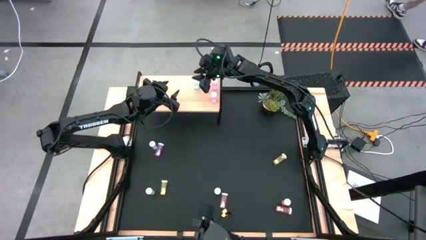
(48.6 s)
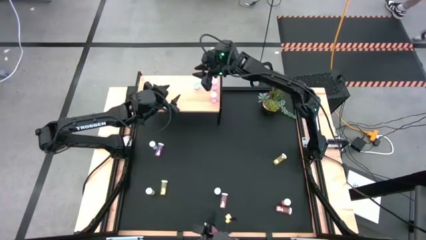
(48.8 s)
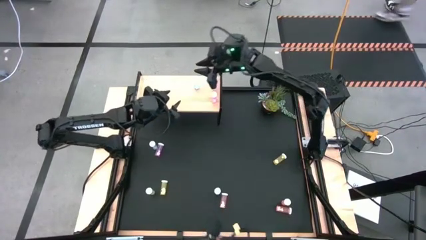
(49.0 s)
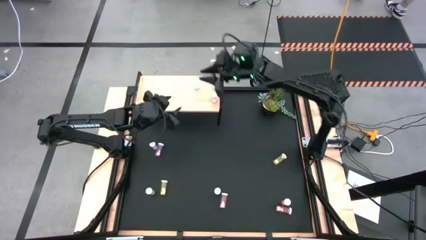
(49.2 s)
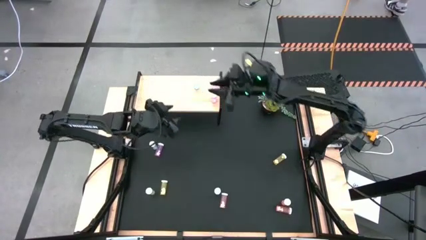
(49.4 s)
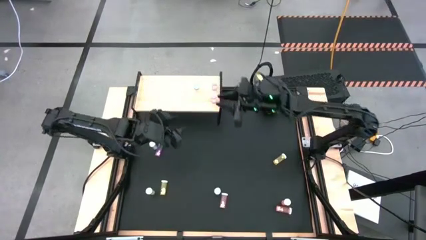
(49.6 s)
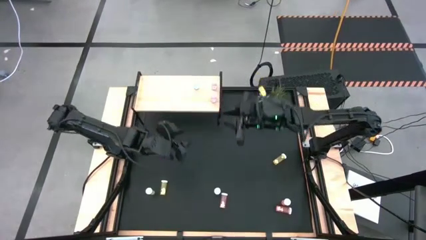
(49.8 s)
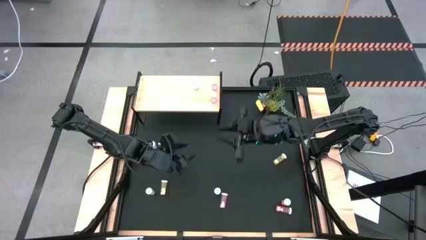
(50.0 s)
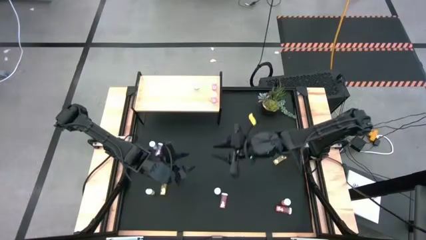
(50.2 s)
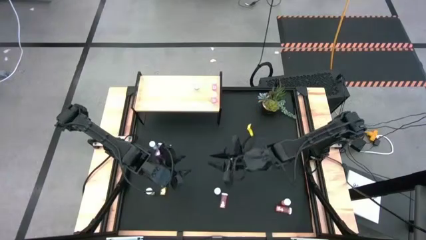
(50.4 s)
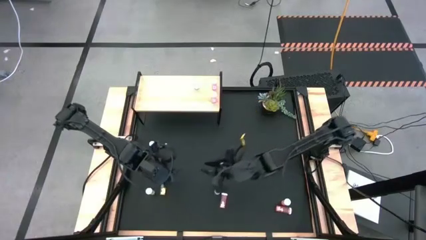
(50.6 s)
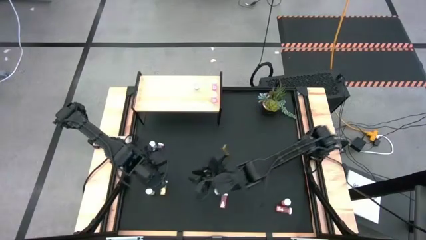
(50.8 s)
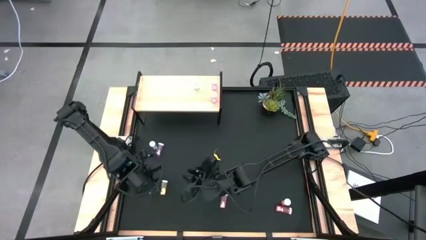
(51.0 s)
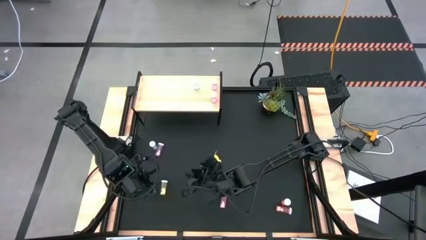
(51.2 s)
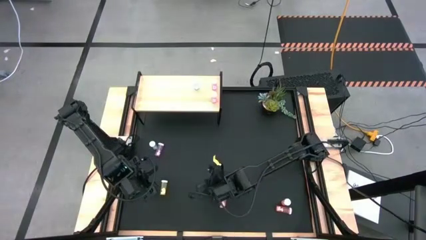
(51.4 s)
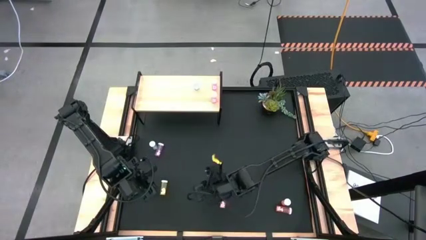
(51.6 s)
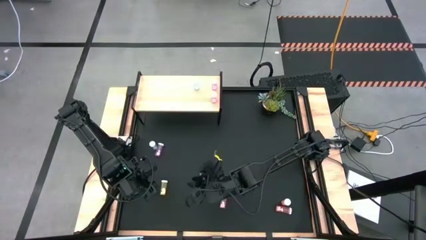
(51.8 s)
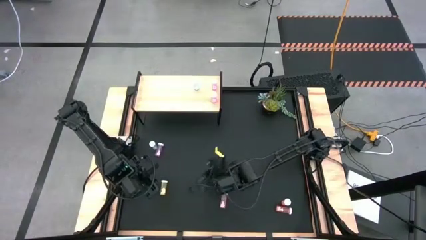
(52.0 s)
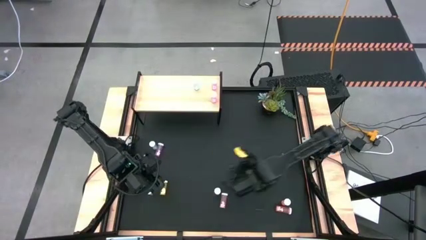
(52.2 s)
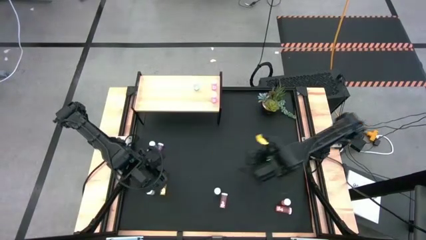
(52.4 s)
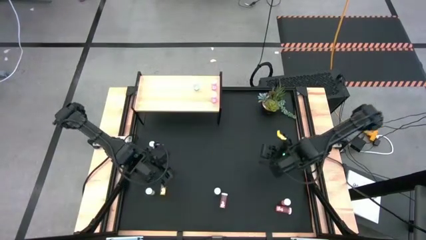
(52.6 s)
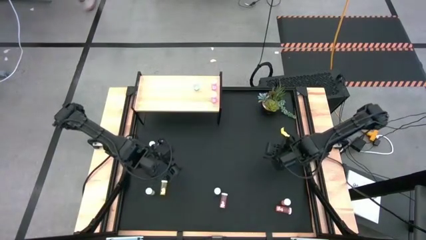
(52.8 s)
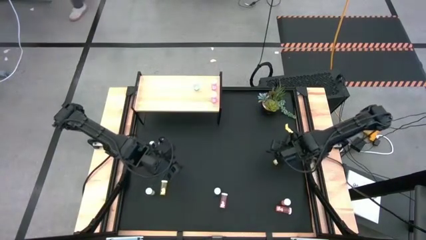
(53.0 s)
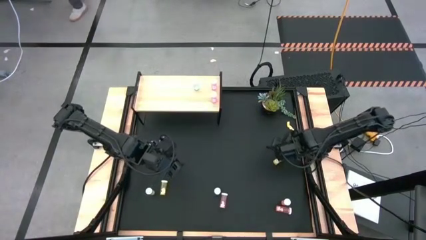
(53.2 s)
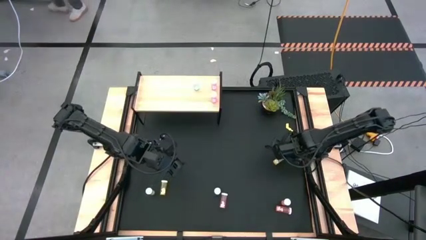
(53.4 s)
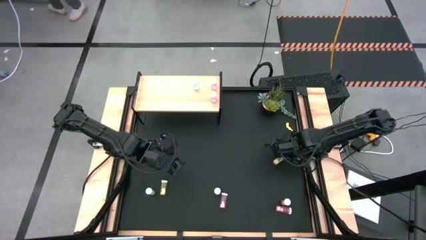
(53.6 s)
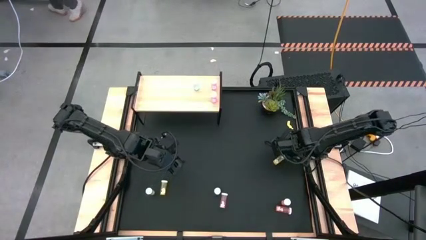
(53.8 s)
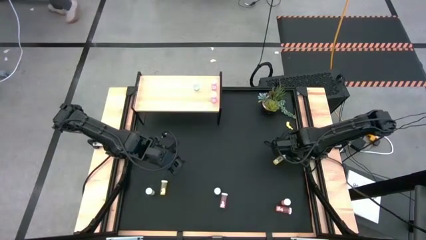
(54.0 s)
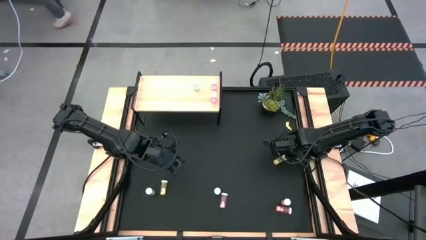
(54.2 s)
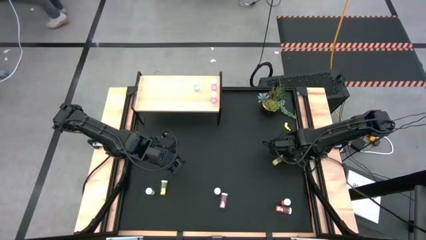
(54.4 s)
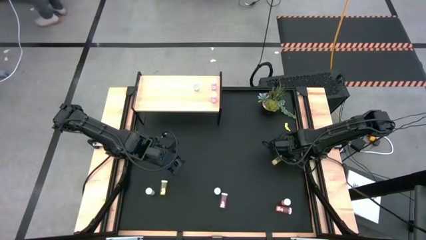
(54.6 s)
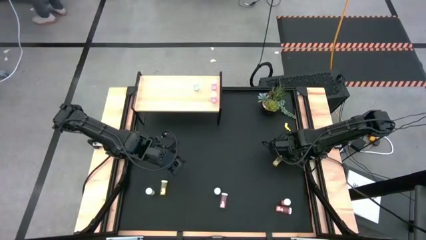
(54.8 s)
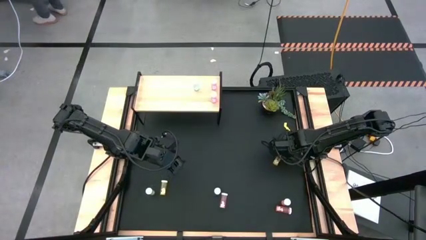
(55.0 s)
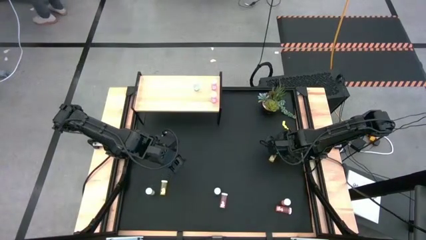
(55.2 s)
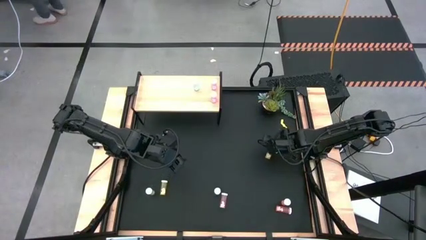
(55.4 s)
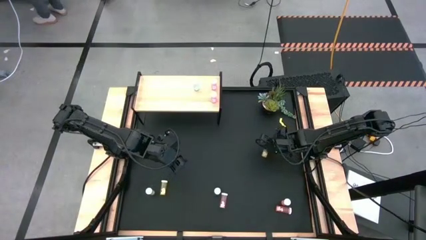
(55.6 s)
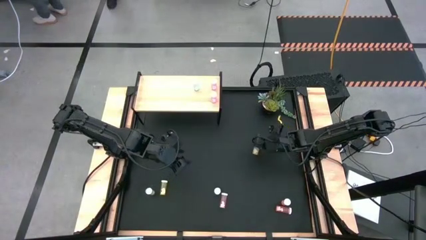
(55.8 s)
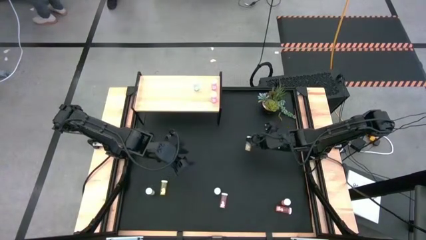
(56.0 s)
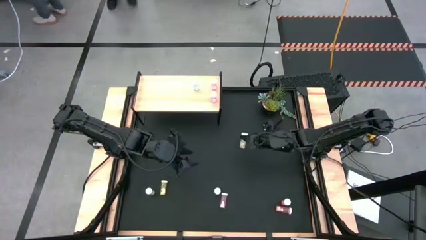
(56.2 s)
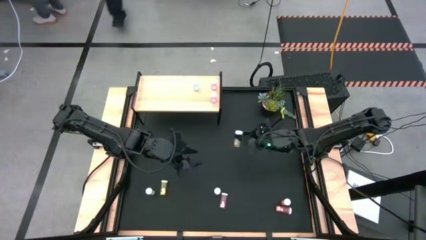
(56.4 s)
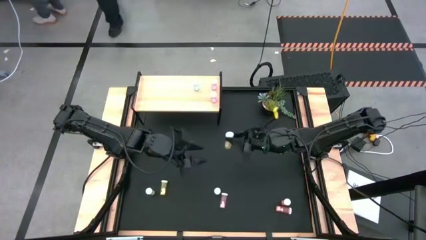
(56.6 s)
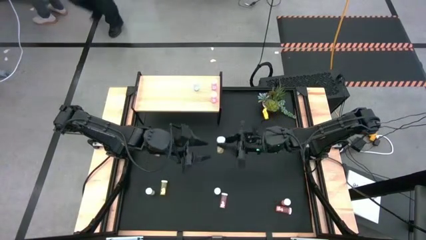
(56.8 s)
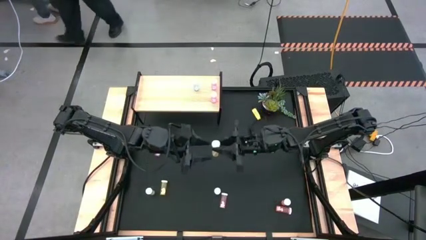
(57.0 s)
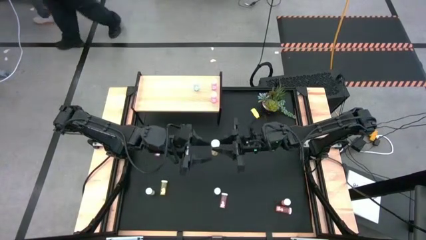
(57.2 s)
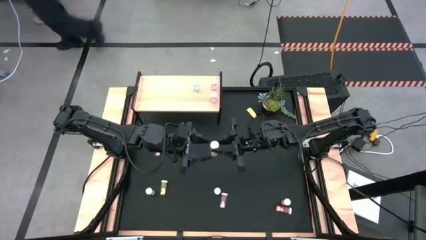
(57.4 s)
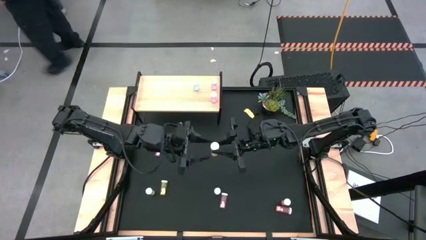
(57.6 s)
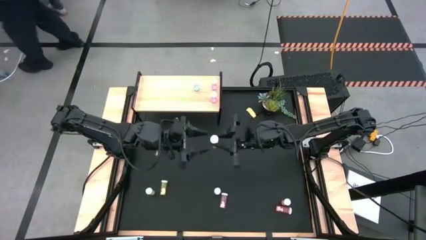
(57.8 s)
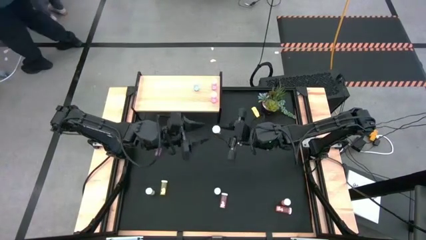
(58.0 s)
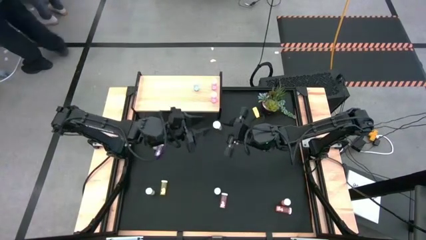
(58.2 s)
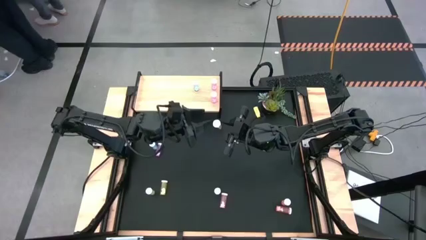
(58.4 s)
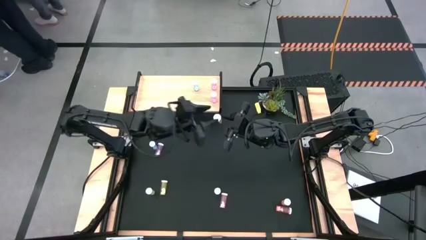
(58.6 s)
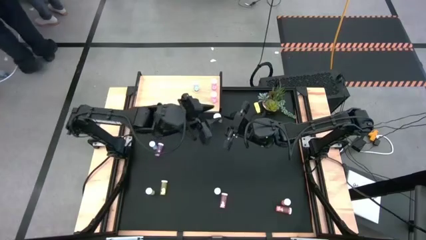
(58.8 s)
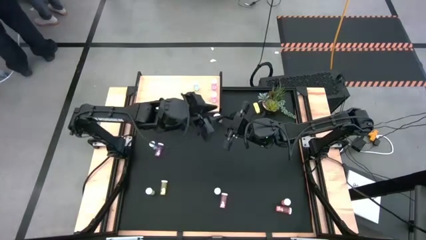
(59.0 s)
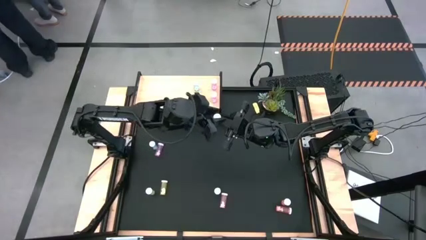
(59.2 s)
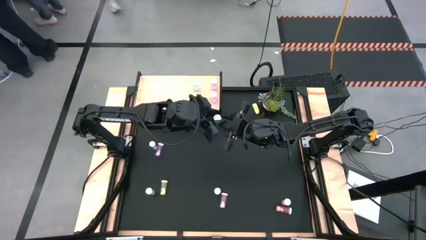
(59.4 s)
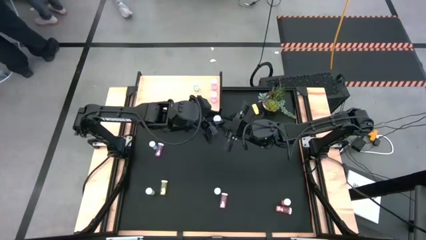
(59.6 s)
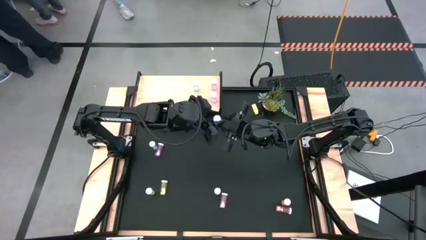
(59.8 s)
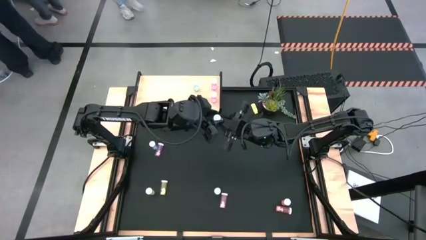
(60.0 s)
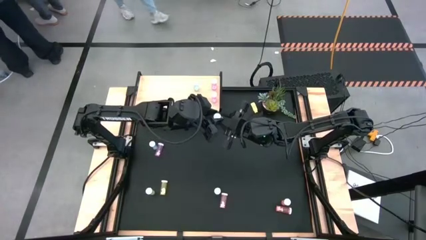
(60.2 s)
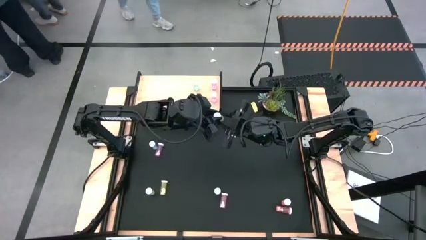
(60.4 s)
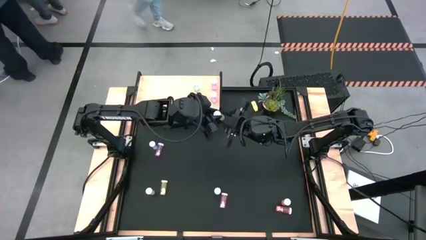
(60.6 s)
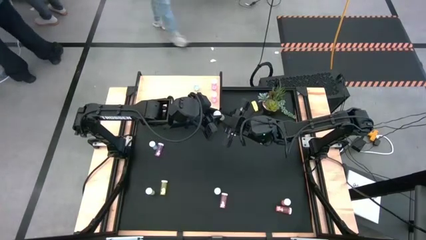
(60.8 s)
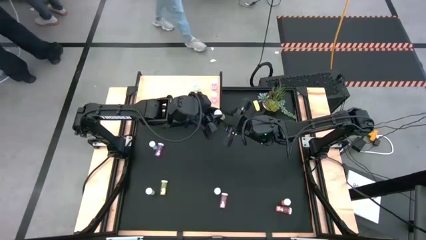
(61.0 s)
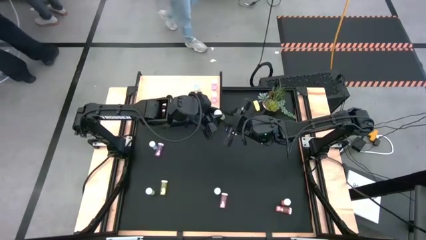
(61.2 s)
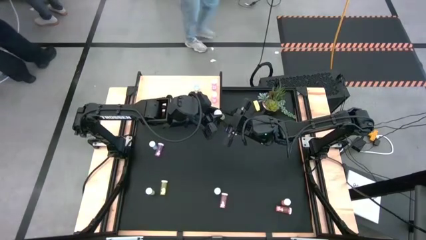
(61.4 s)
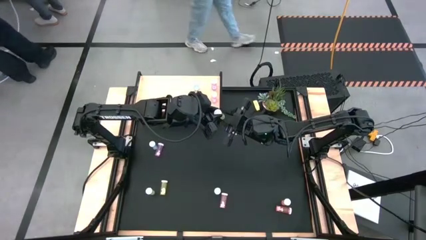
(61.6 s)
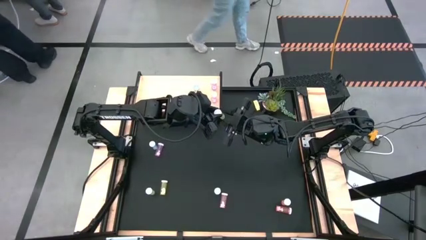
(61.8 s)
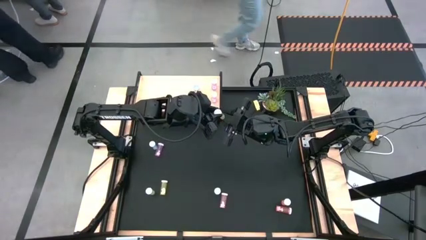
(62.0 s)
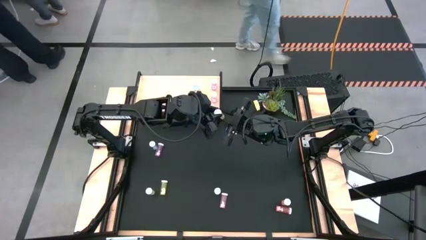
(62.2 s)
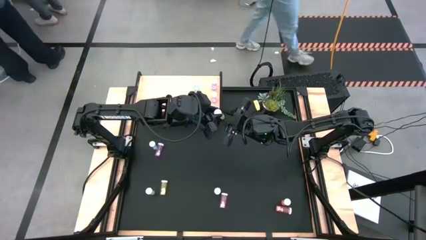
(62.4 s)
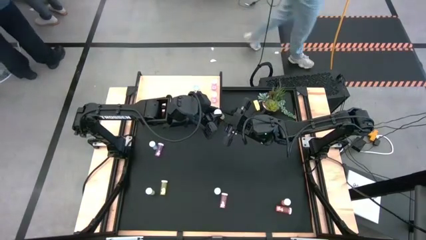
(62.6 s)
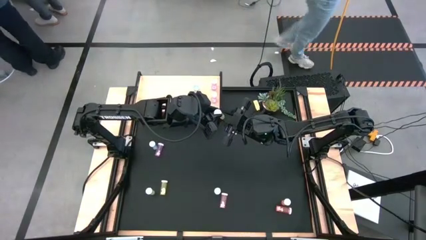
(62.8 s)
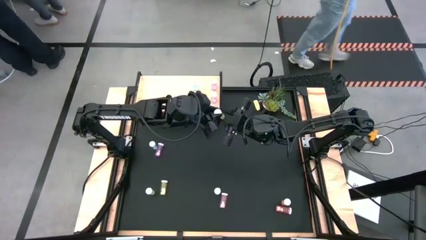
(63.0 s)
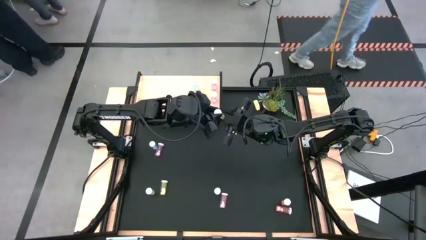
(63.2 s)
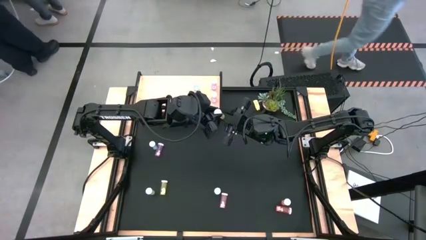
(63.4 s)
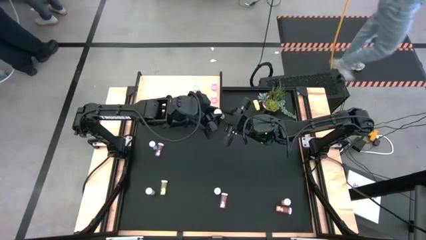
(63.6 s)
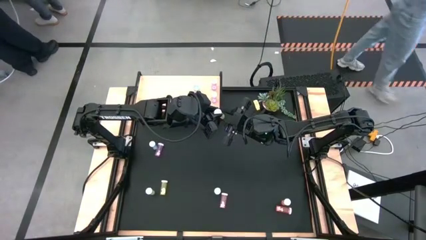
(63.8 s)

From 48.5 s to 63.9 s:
Task: Pick and place medicine bottles onto shelf by color
Put the top yellow pill bottle on the shelf

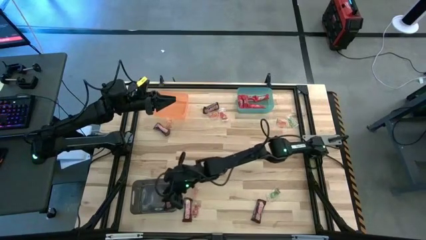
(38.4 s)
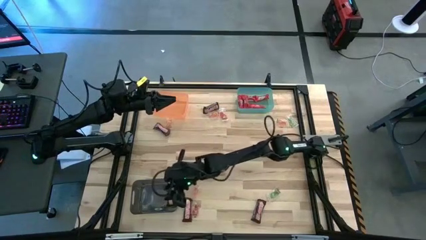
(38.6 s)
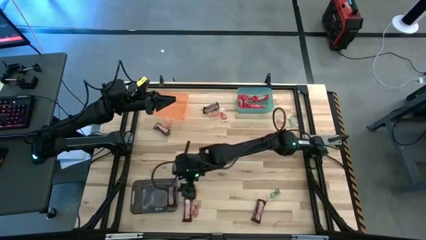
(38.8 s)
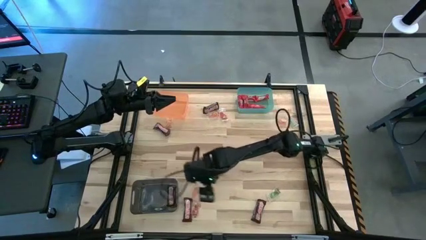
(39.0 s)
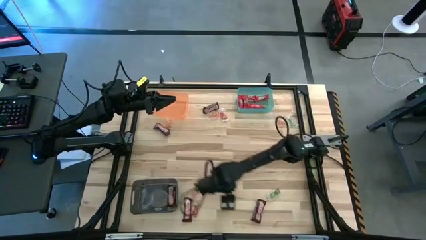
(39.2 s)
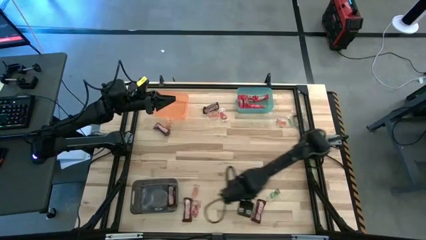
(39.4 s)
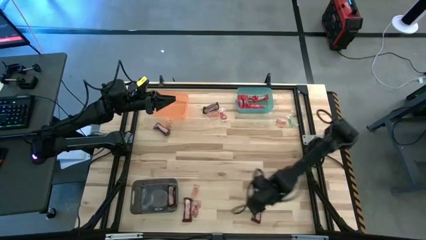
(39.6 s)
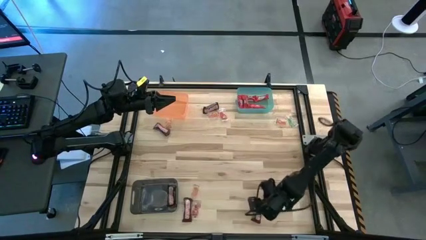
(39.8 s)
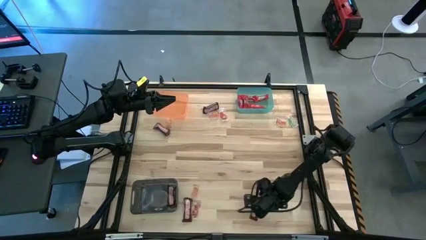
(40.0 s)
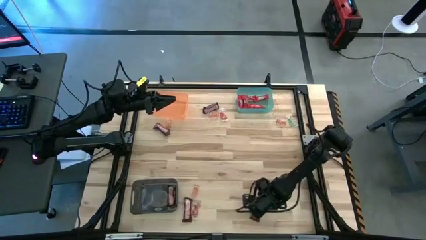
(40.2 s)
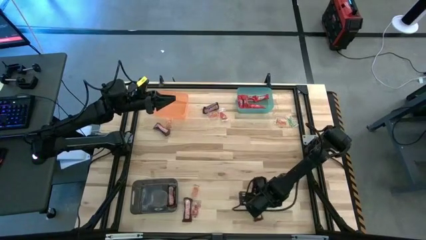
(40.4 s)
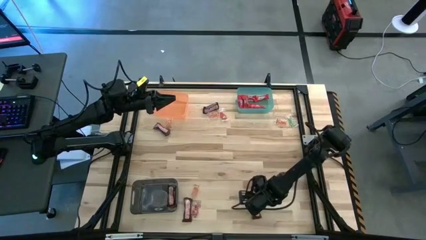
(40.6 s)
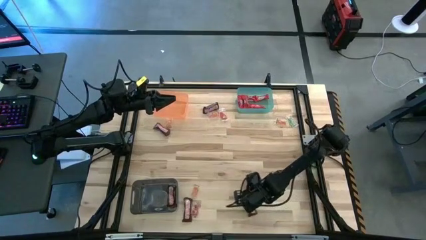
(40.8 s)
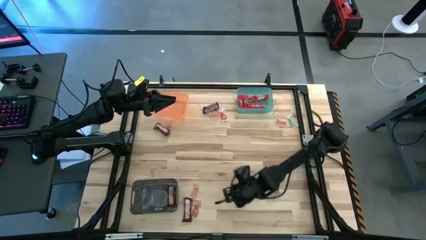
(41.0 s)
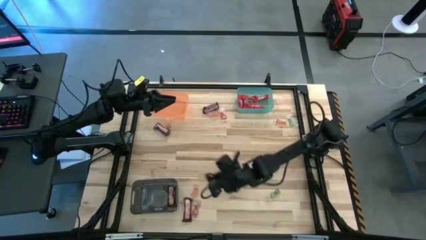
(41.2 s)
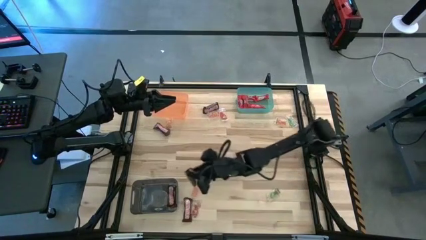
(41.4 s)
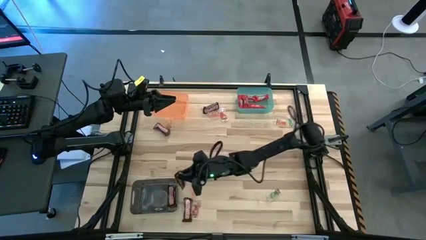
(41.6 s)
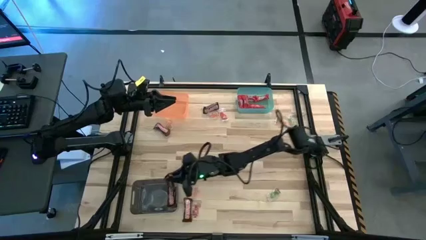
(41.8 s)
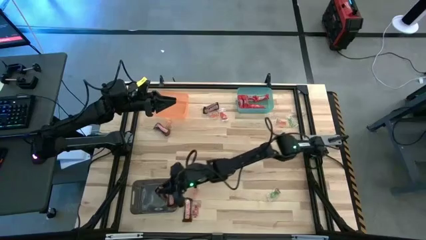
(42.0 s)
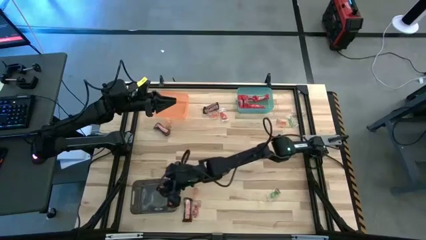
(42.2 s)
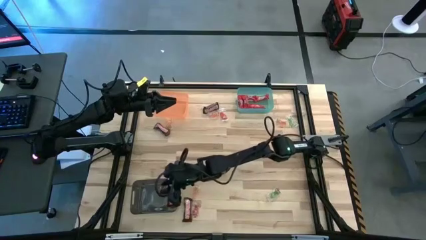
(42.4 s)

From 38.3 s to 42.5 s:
Task: Sort candy by brand, put in halloween buckets
Put the brown chocolate bar into the black bin
